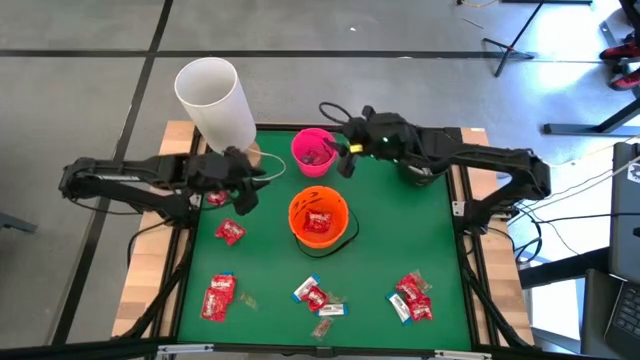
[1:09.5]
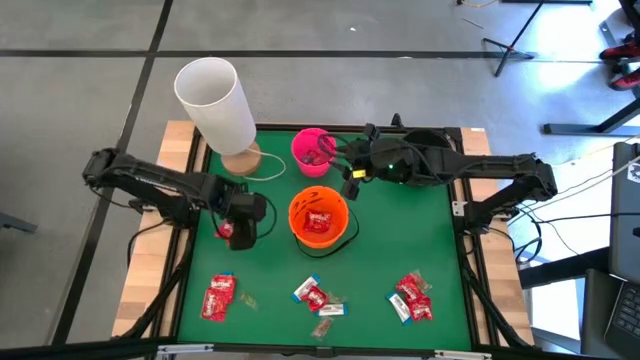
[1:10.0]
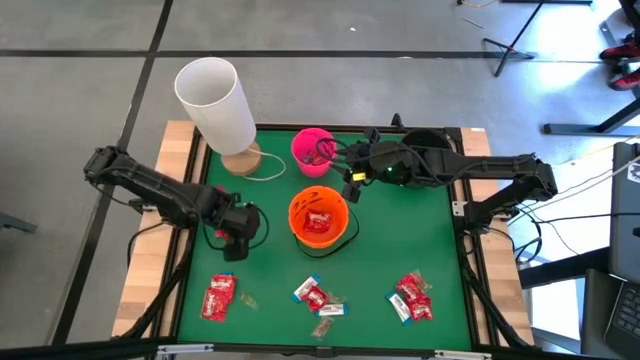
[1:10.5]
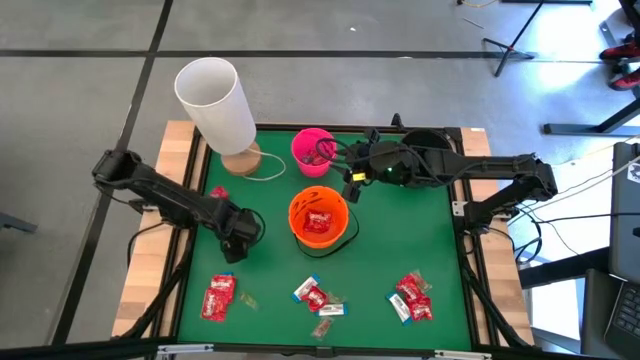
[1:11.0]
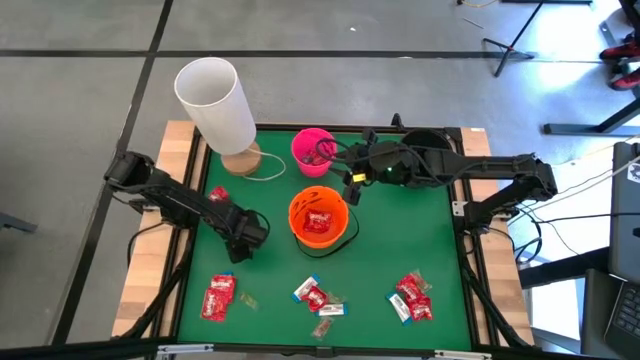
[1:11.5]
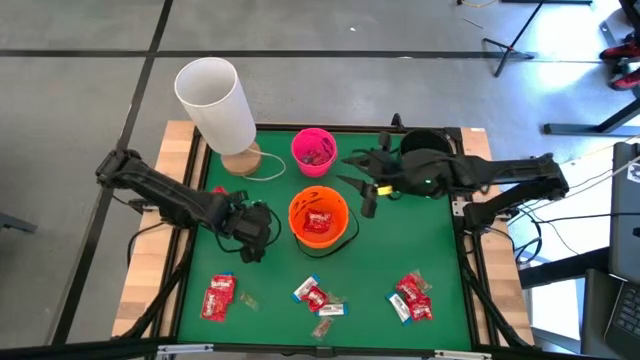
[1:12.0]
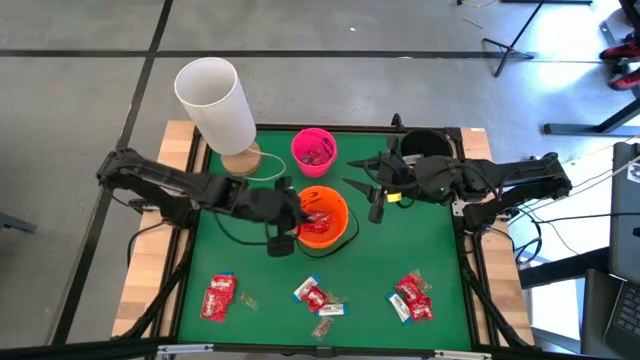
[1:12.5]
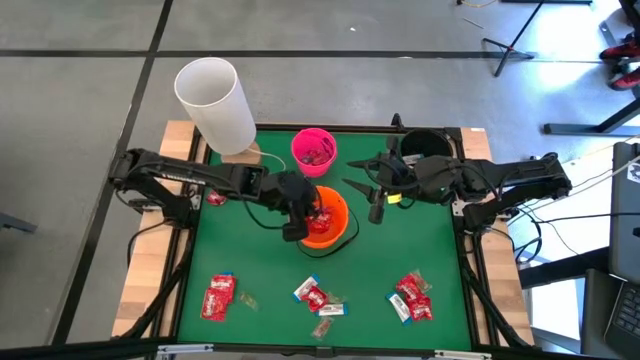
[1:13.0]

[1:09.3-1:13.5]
Task: Sort candy
Put the red candy into the orange bucket

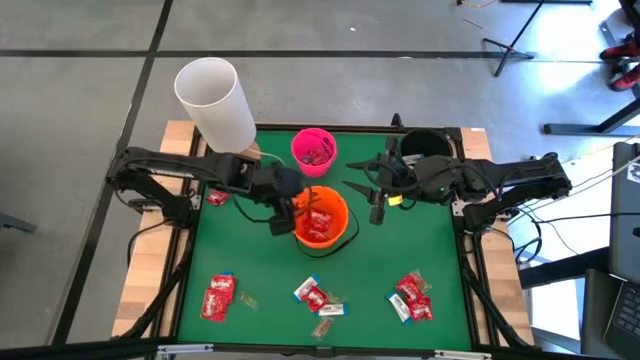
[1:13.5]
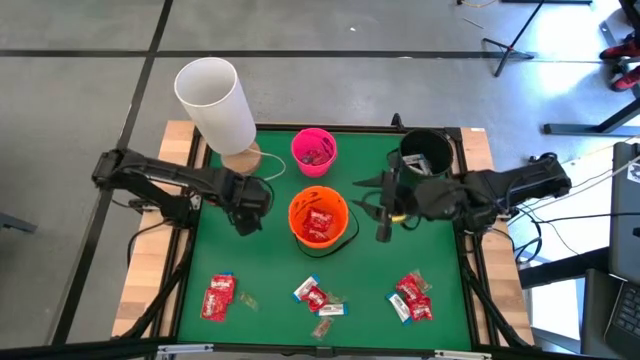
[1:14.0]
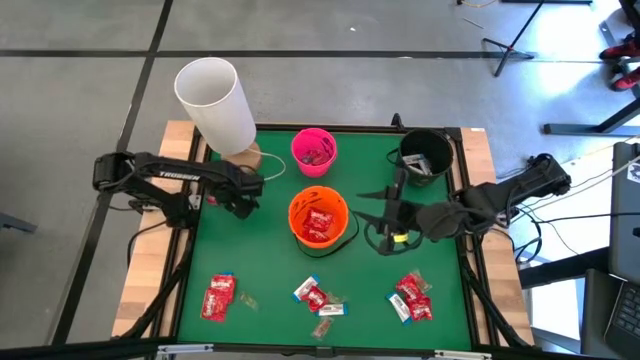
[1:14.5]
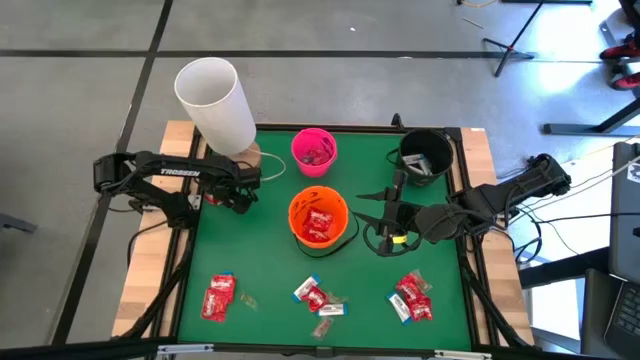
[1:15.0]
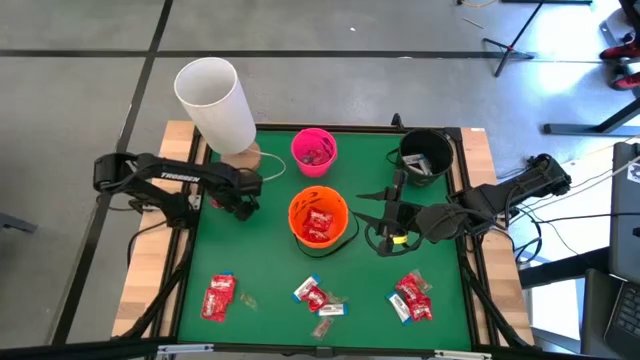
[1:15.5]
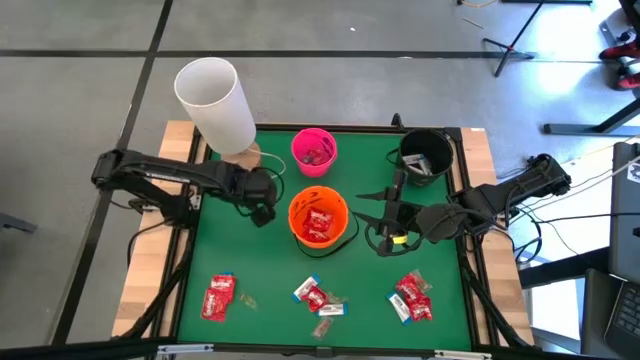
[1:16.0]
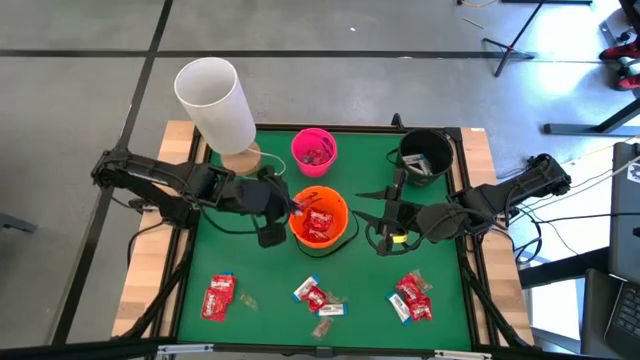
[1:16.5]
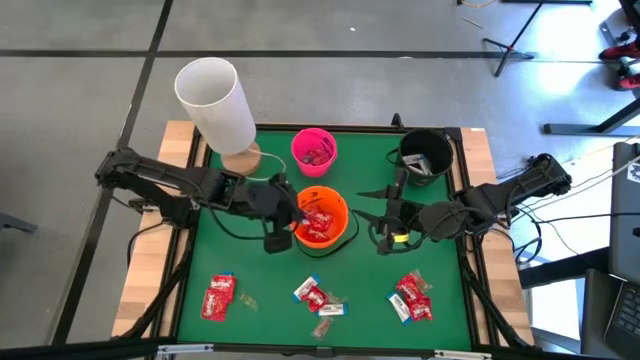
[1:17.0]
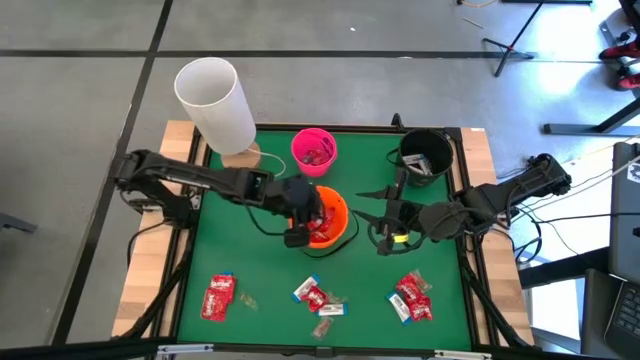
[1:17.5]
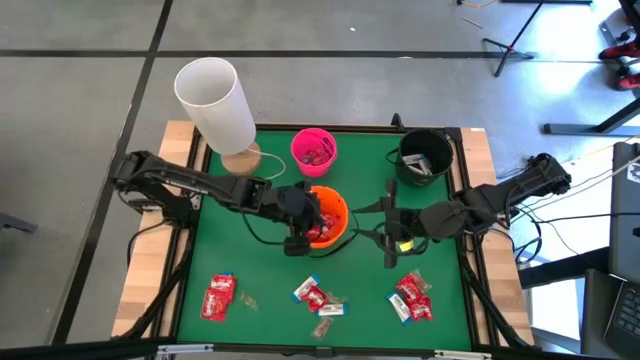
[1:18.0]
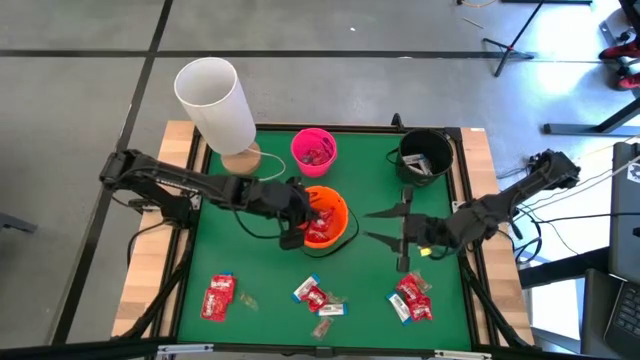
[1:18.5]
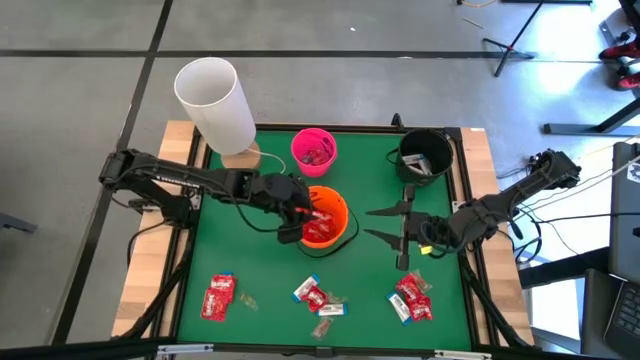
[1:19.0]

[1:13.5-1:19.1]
Put the red candy into the orange bucket

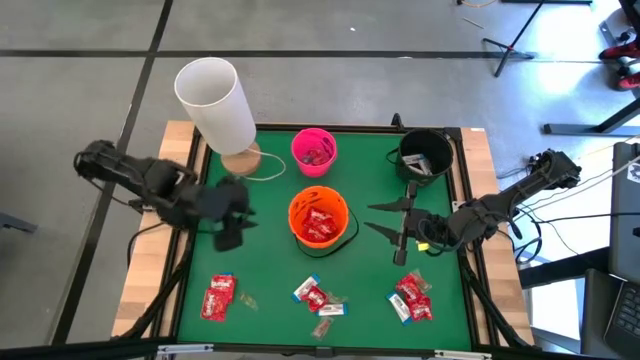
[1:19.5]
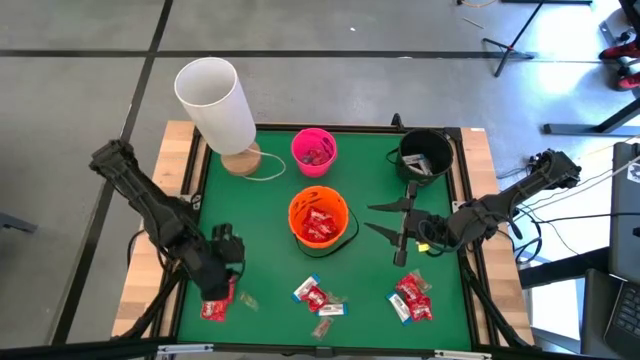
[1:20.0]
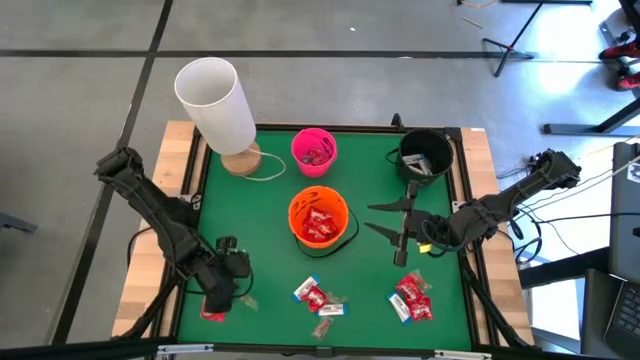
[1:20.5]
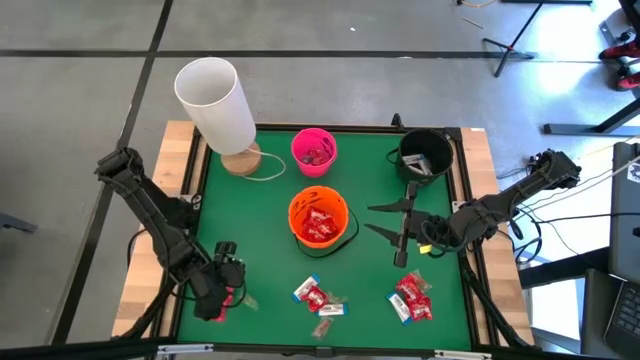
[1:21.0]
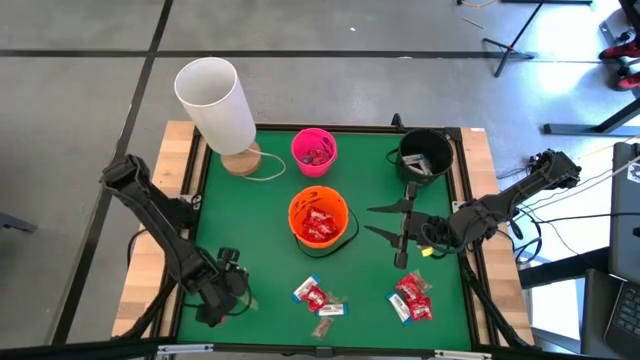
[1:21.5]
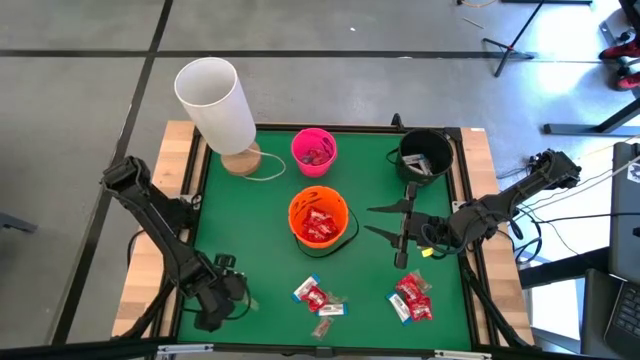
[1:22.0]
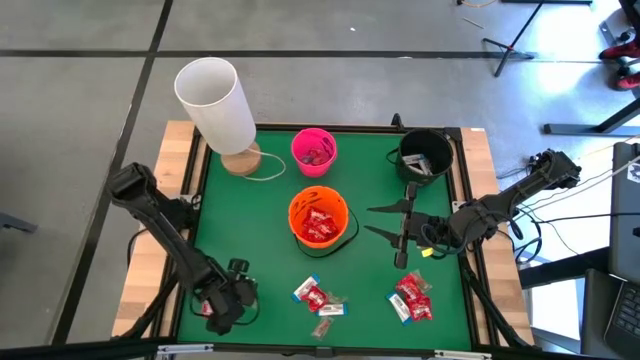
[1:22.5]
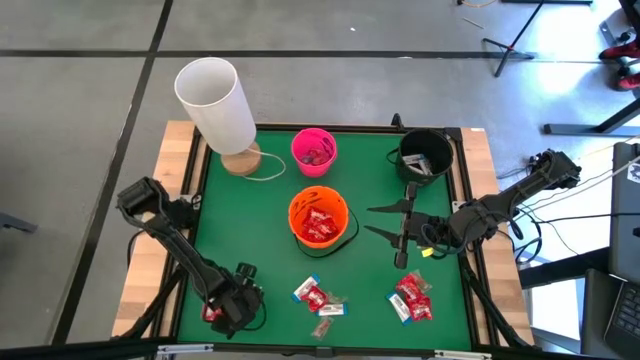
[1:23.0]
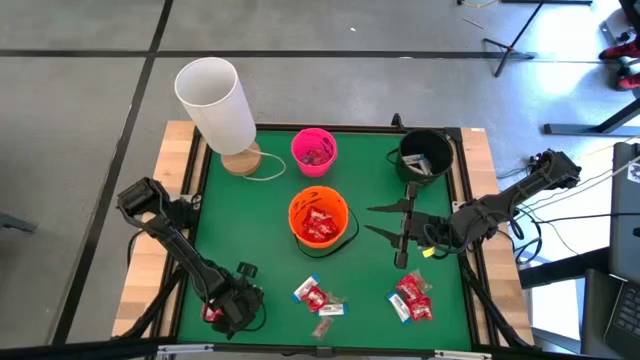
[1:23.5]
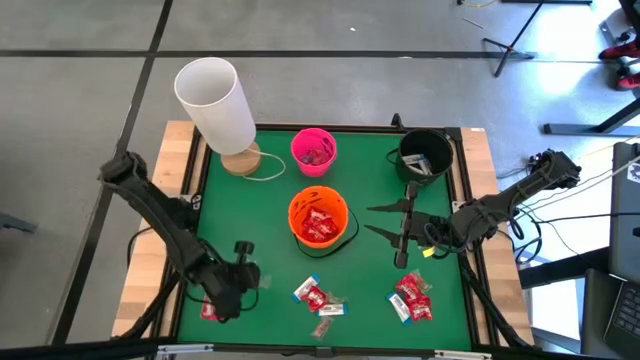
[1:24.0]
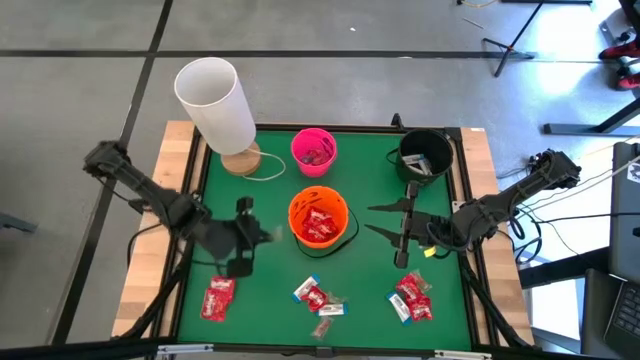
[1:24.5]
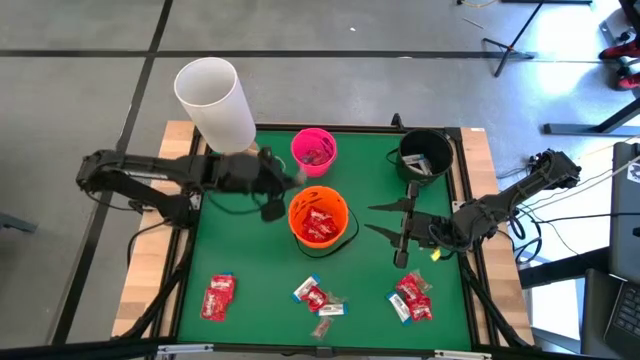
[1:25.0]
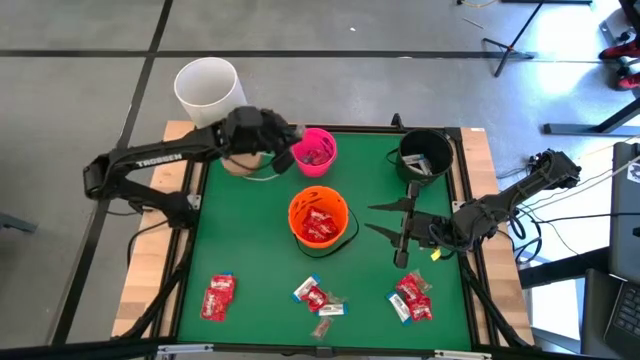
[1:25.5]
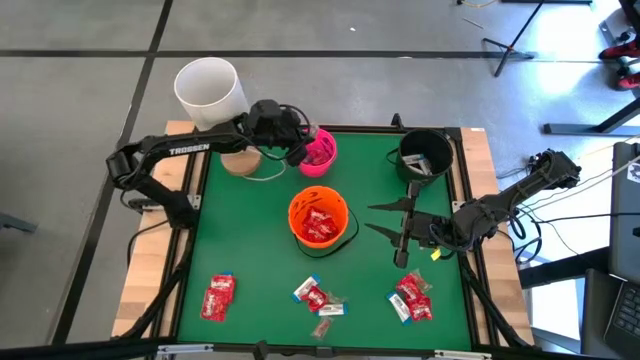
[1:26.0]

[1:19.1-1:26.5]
Put the green candy into the pink bucket

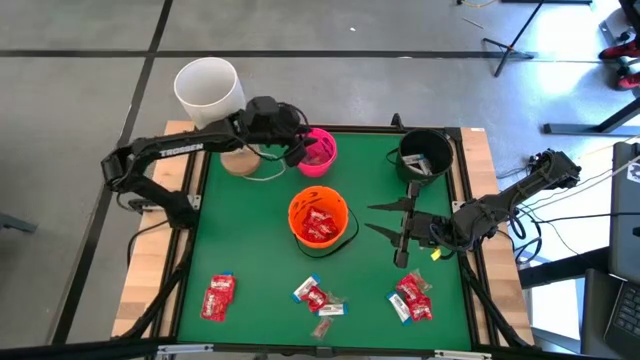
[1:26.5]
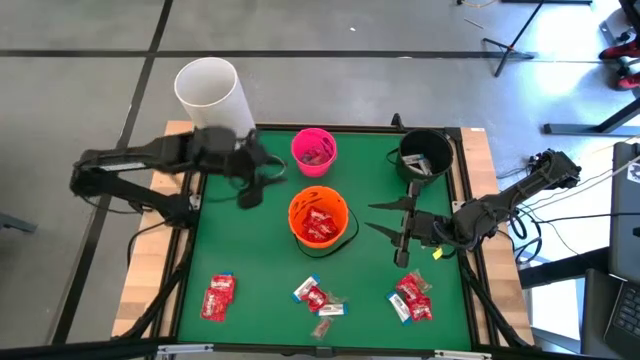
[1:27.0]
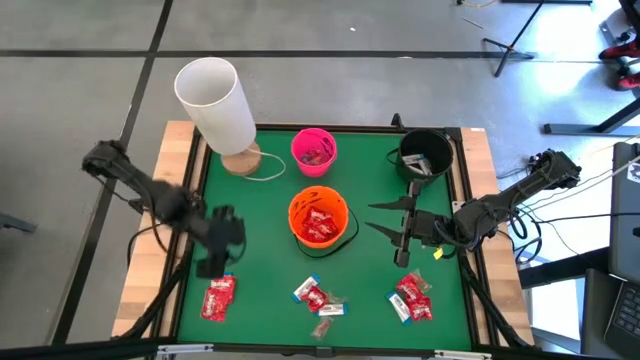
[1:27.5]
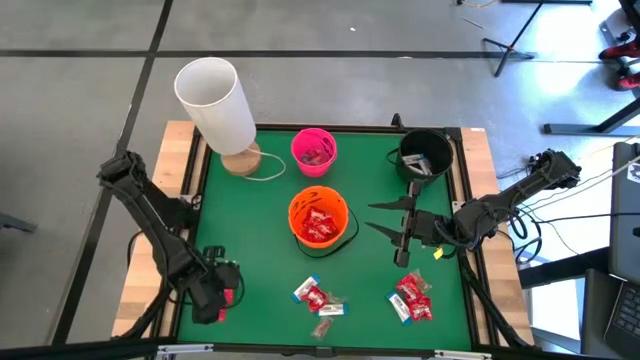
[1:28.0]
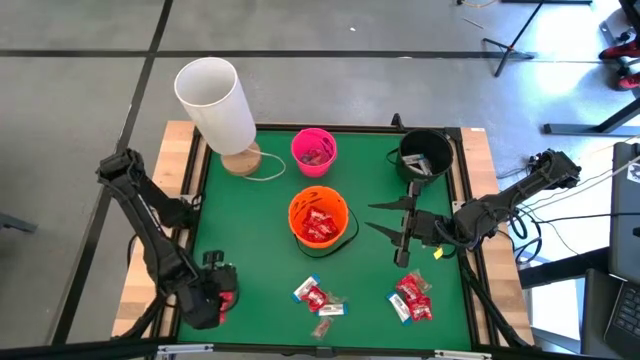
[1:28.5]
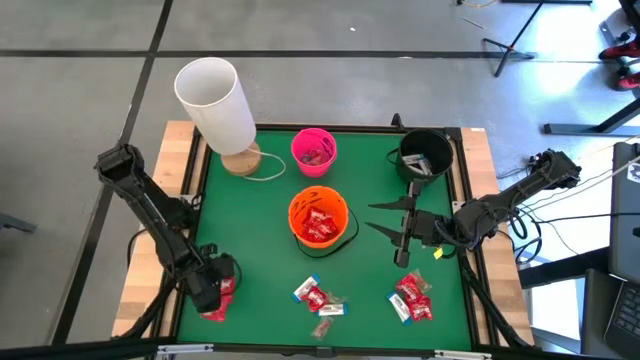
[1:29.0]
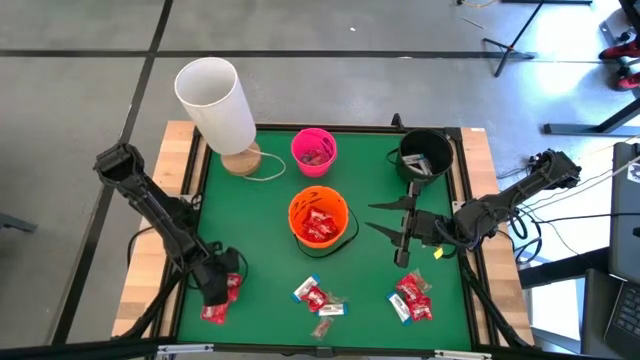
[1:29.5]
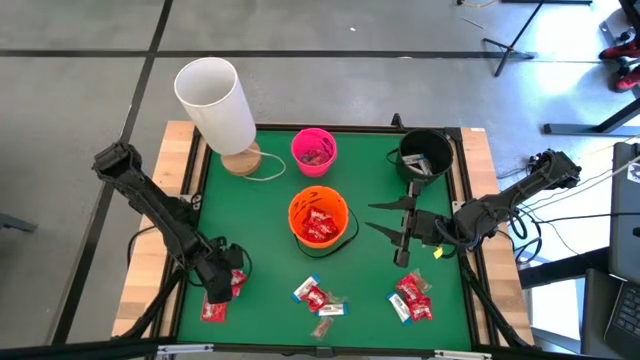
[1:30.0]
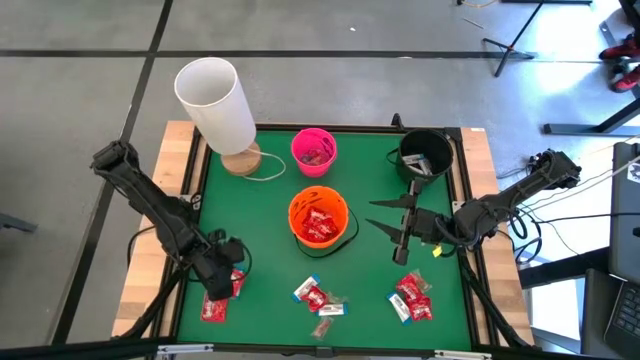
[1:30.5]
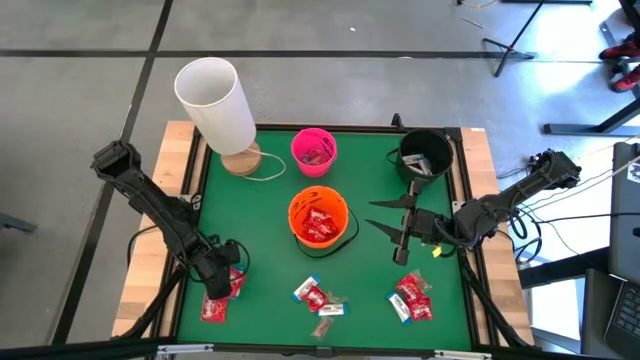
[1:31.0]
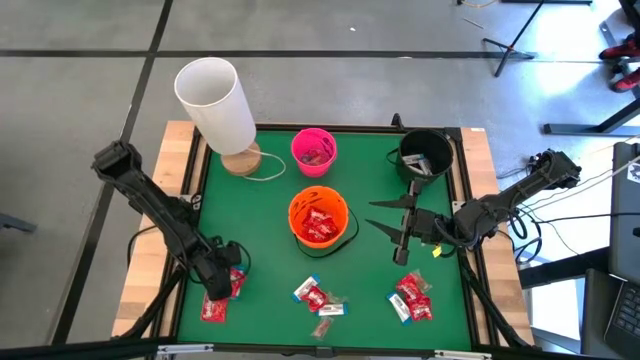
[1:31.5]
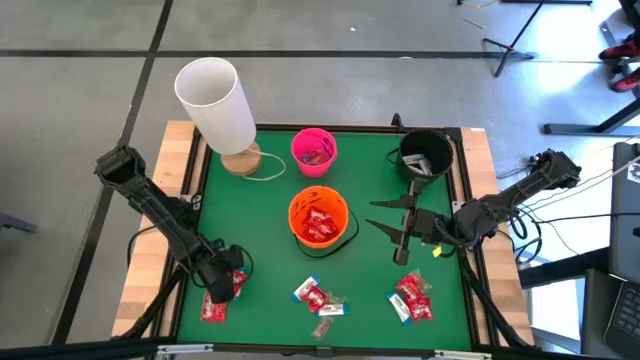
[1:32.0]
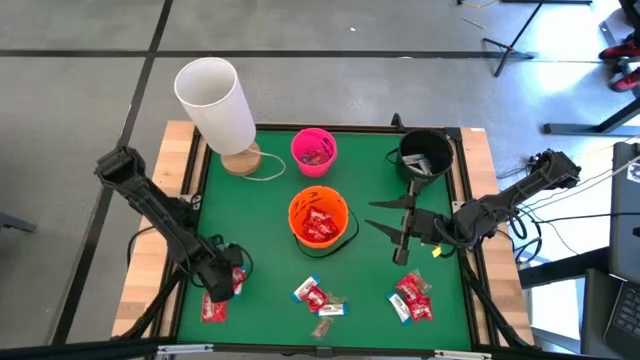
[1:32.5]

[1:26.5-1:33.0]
Put the red candy into the orange bucket
